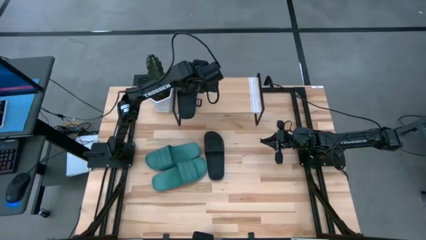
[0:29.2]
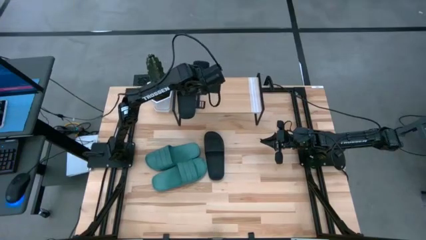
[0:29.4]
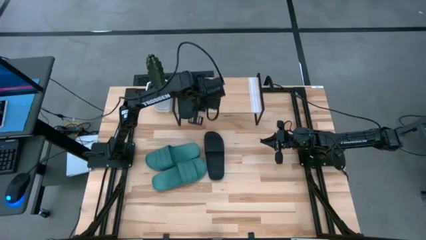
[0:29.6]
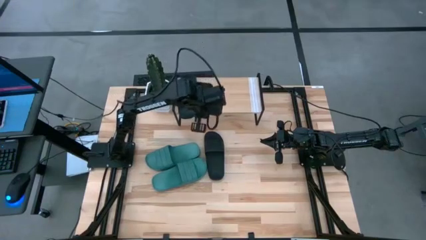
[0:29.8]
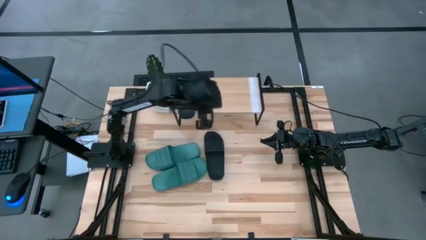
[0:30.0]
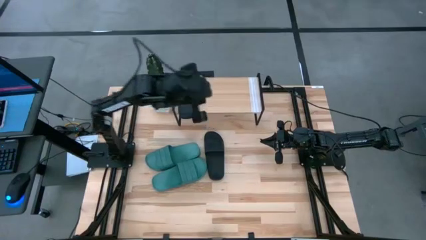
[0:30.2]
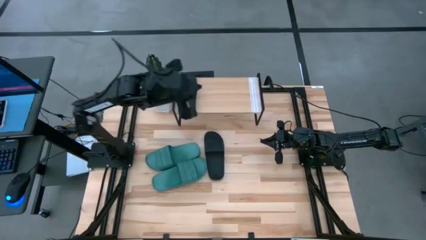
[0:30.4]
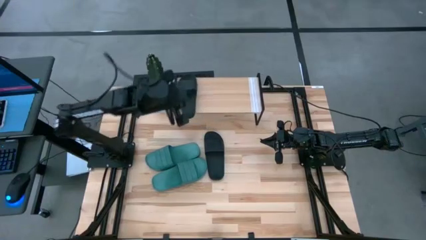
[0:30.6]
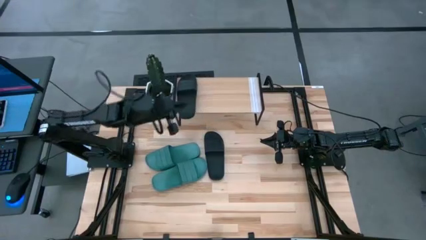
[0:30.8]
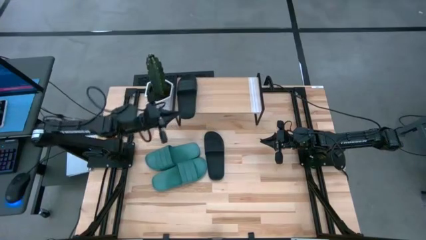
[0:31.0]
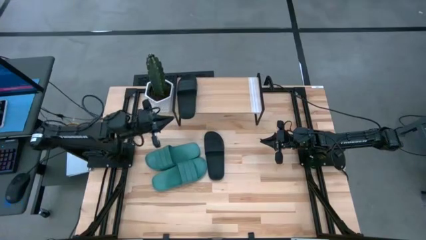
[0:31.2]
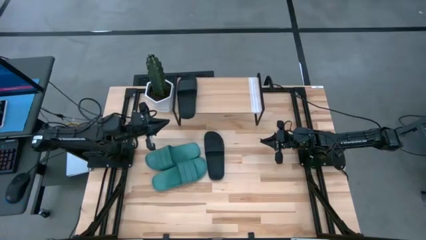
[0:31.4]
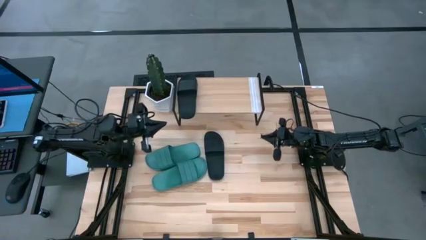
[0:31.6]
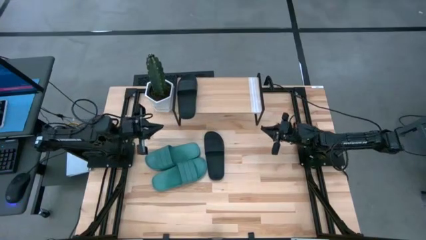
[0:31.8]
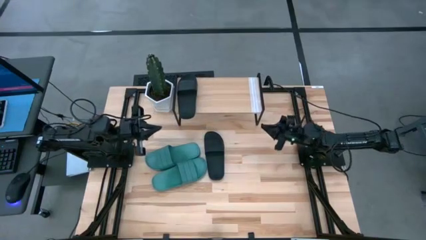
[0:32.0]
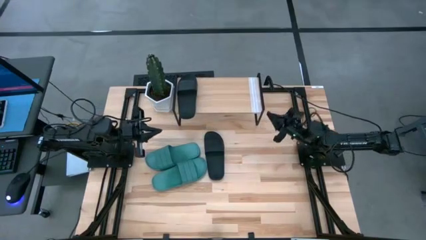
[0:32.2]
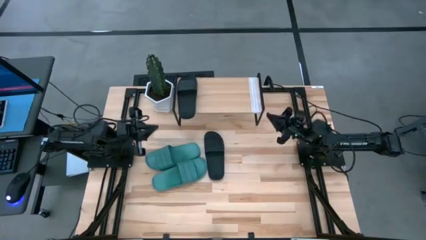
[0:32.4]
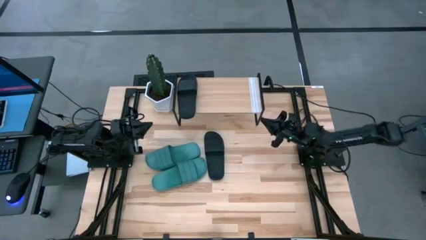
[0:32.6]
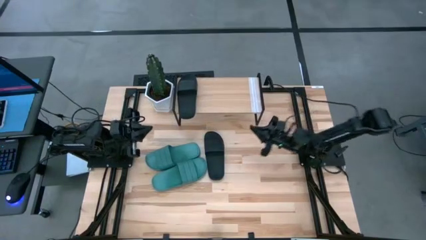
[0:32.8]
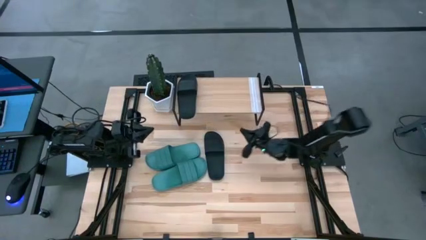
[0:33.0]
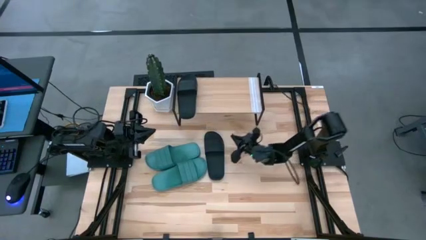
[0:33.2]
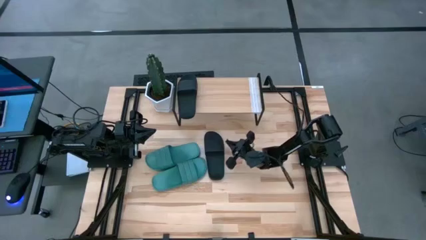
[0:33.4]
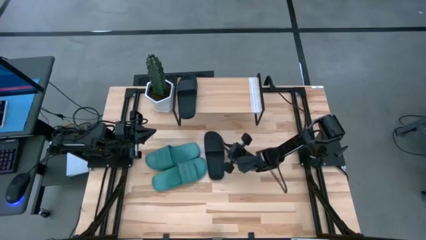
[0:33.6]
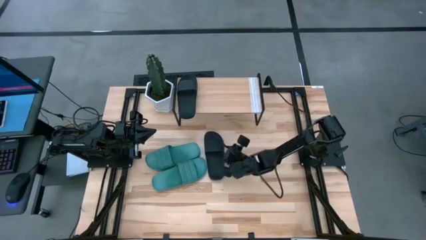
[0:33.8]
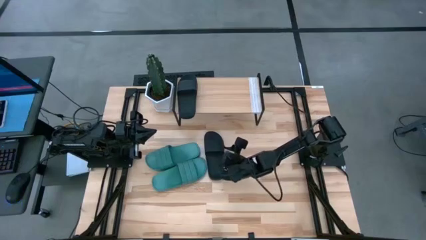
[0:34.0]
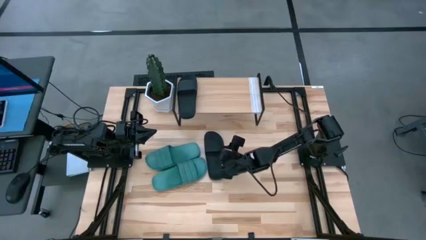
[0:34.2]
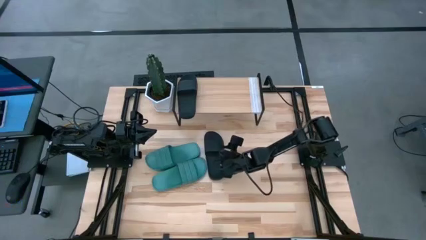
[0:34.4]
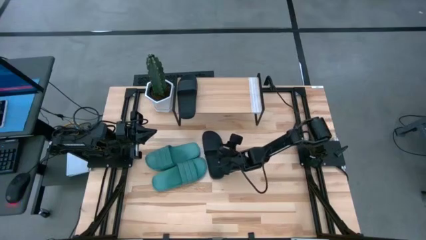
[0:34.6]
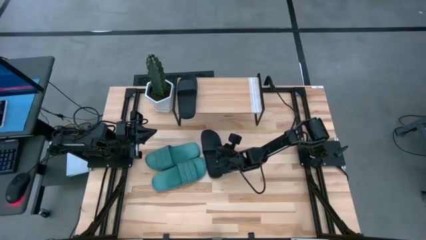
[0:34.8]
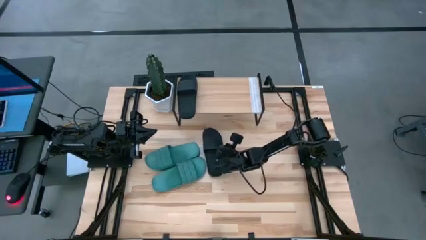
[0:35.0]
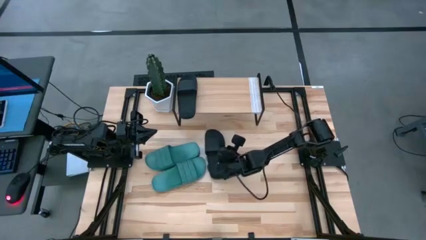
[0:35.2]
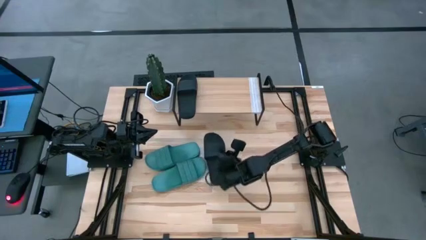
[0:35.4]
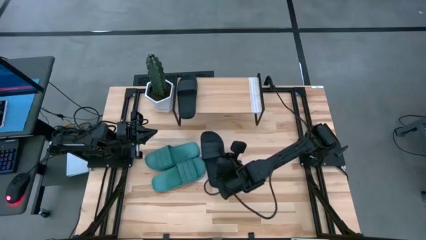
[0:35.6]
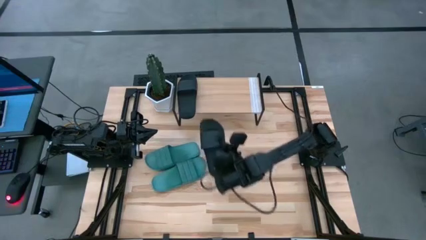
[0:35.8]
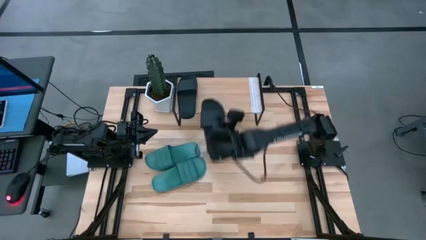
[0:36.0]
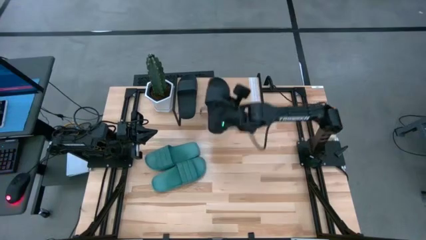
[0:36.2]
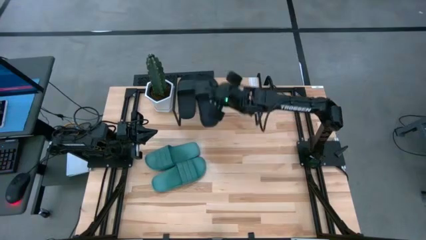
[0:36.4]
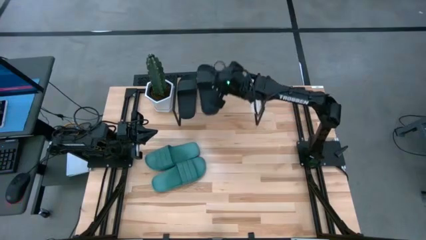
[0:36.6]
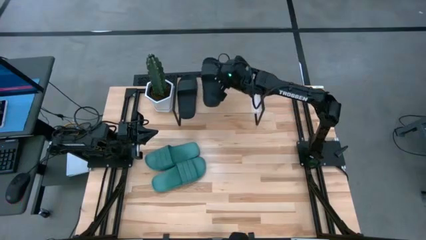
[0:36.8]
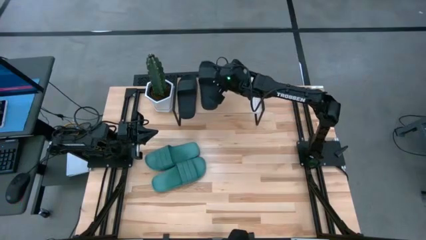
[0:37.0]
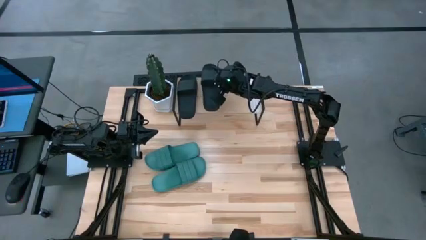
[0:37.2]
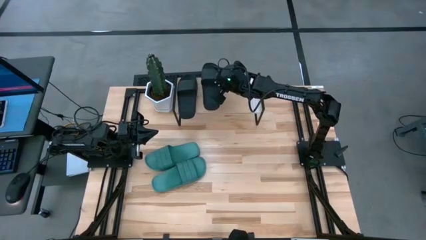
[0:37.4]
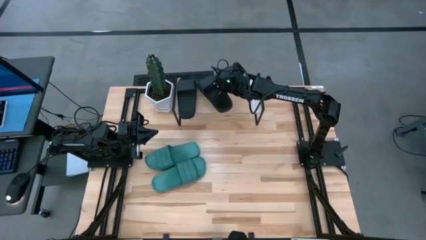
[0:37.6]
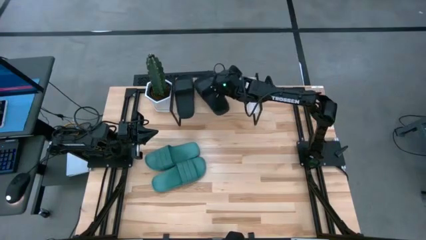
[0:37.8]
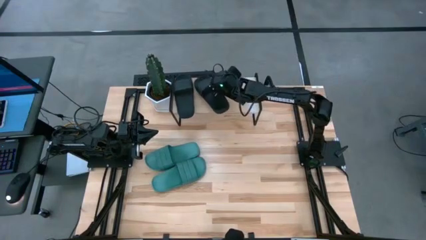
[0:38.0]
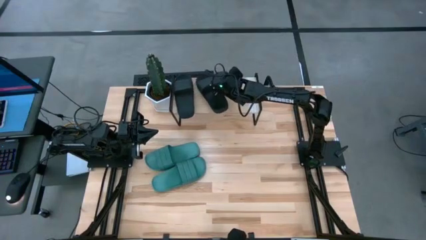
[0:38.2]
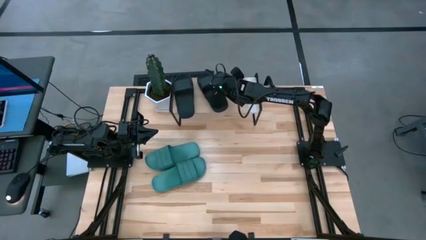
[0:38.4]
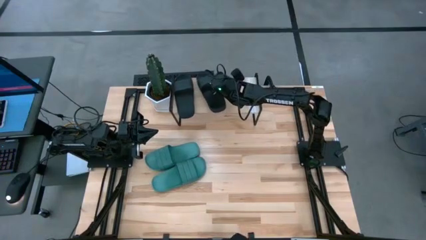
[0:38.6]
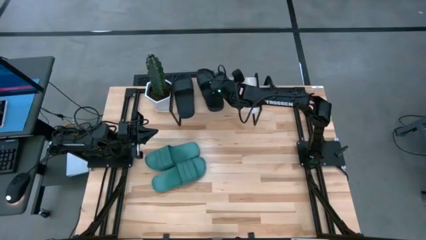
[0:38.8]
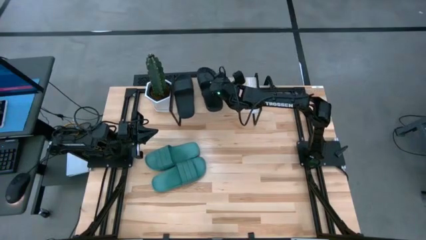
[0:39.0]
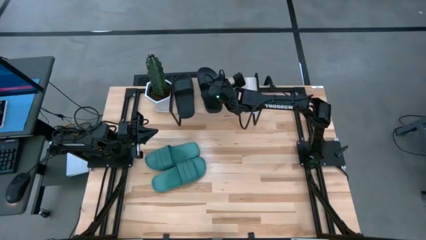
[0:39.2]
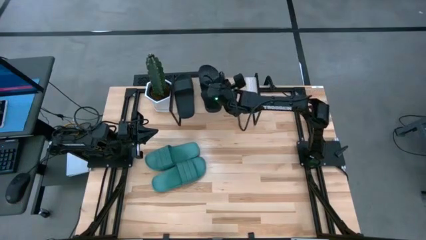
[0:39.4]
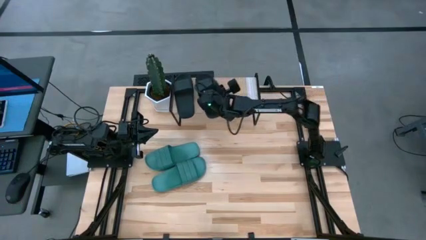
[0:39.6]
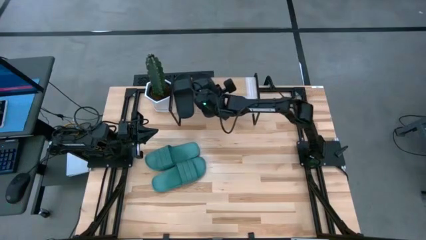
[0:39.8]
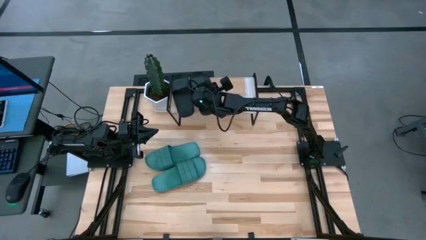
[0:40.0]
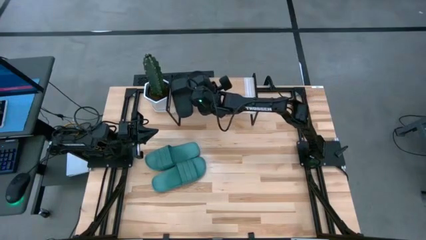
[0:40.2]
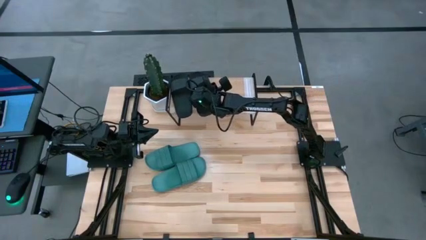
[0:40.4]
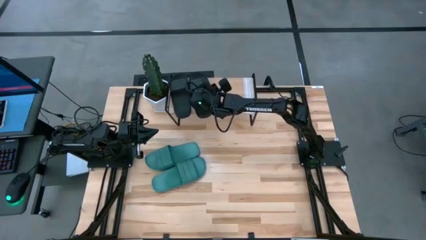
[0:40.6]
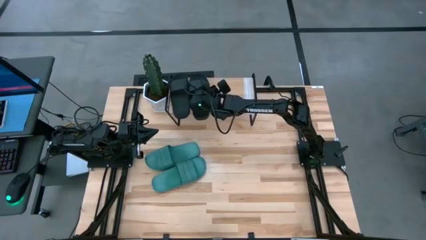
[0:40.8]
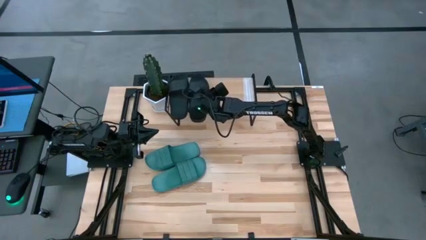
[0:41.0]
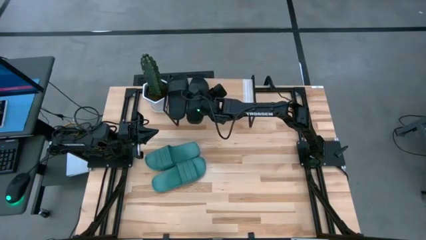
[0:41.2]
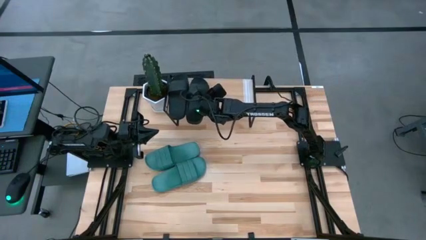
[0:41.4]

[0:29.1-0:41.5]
Task: Pick and place slides into the shelf
Put the black slide on the shelf
